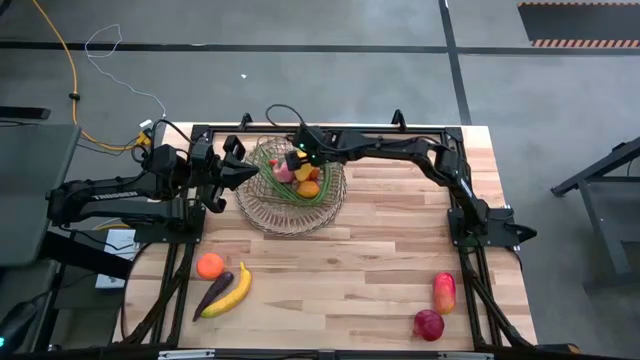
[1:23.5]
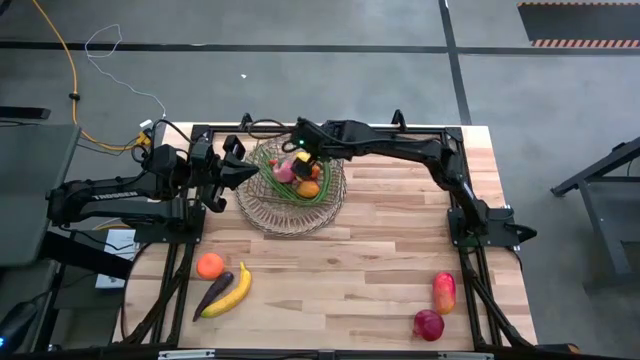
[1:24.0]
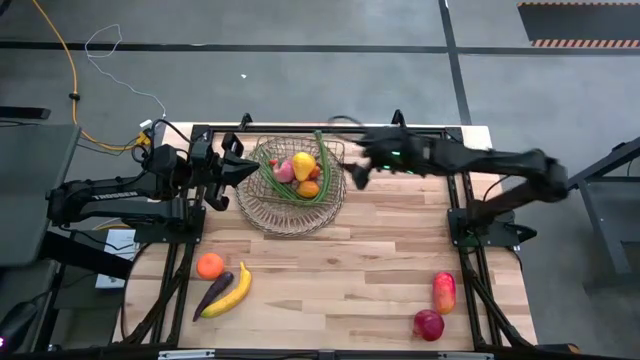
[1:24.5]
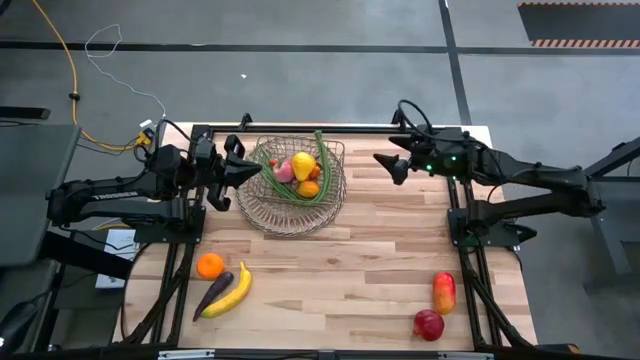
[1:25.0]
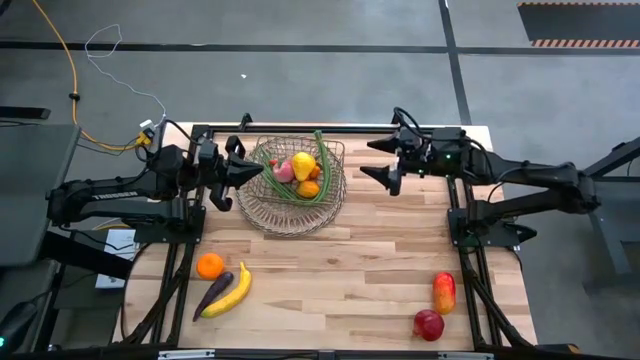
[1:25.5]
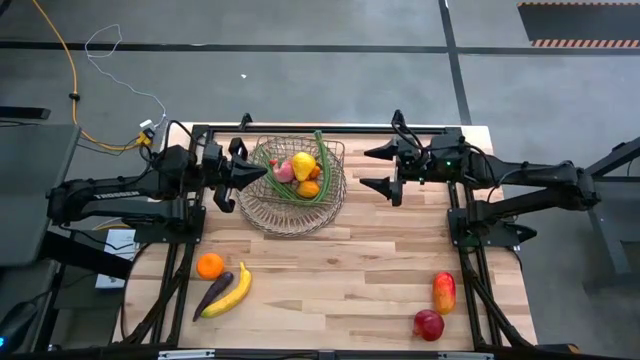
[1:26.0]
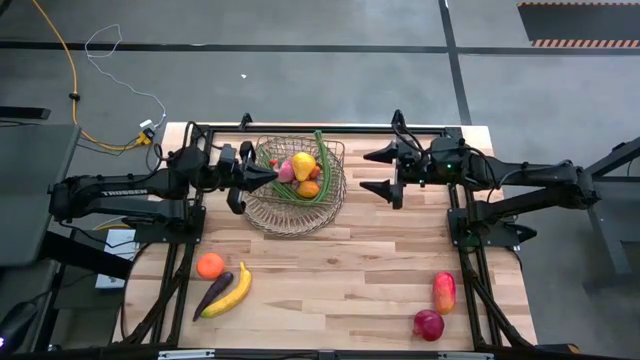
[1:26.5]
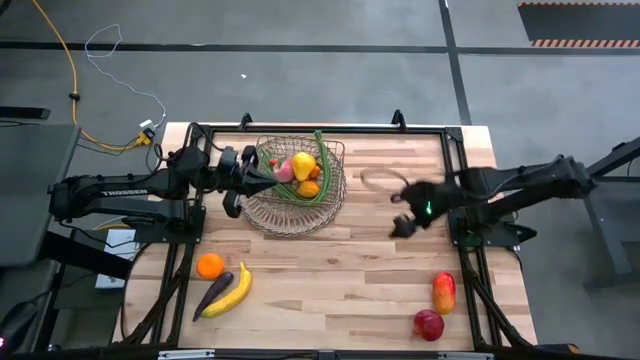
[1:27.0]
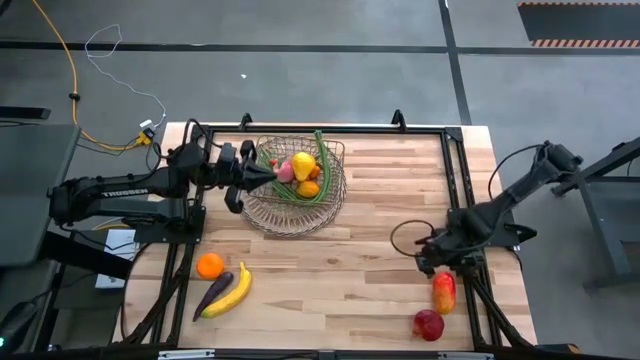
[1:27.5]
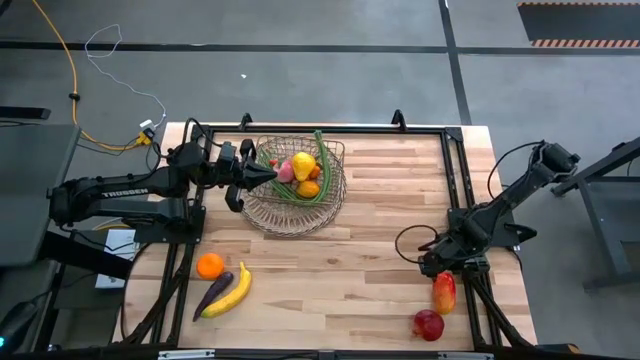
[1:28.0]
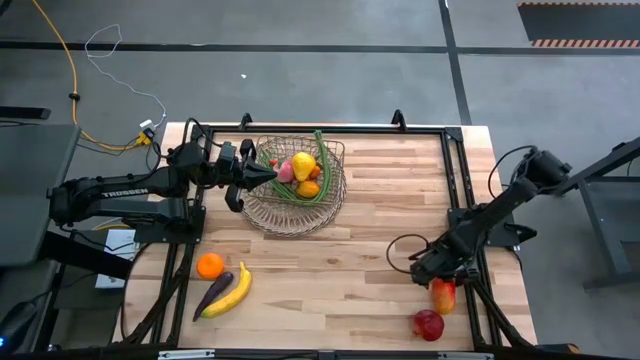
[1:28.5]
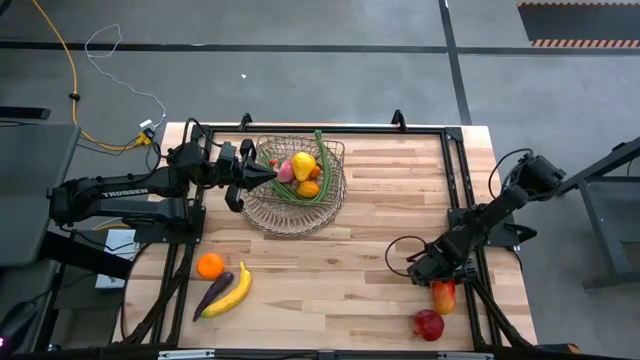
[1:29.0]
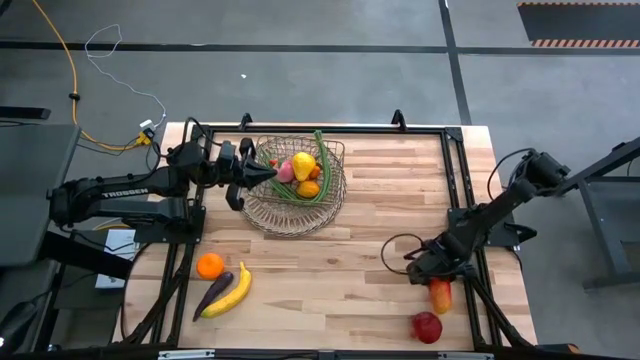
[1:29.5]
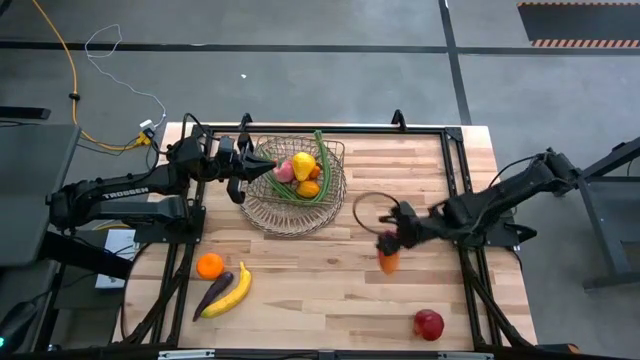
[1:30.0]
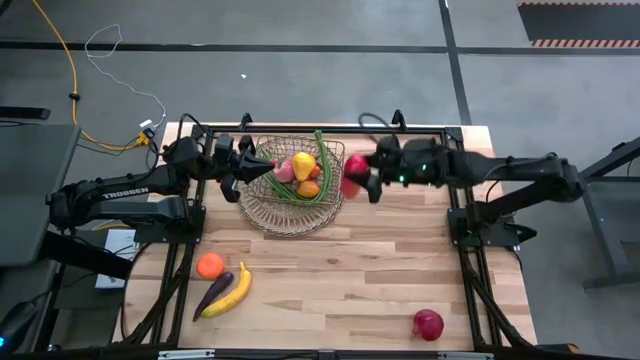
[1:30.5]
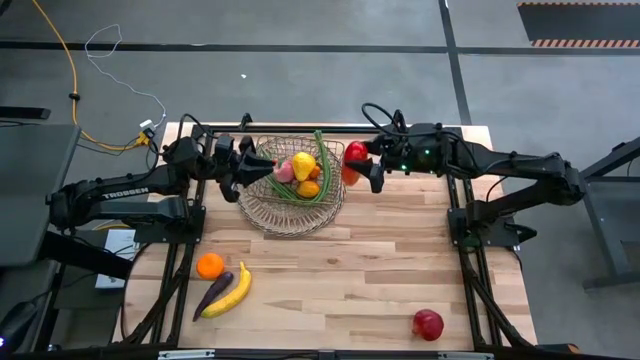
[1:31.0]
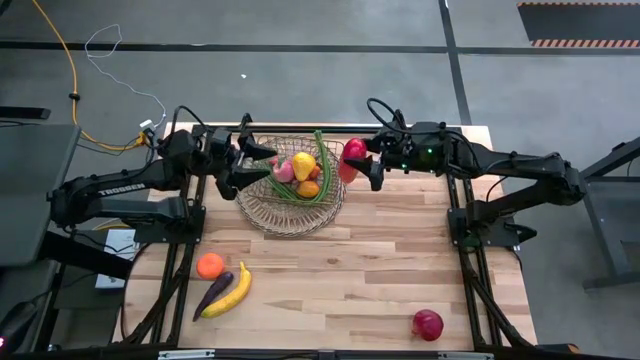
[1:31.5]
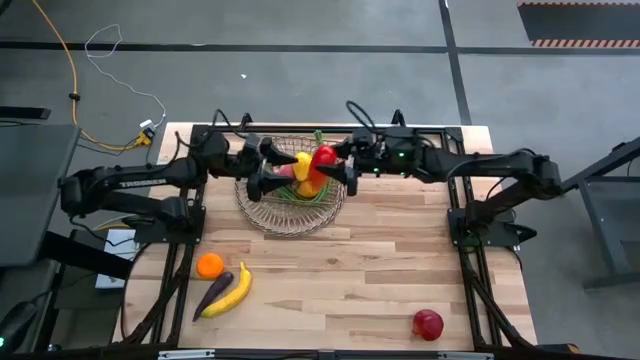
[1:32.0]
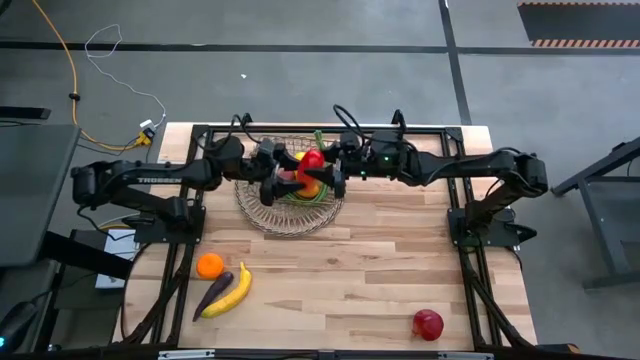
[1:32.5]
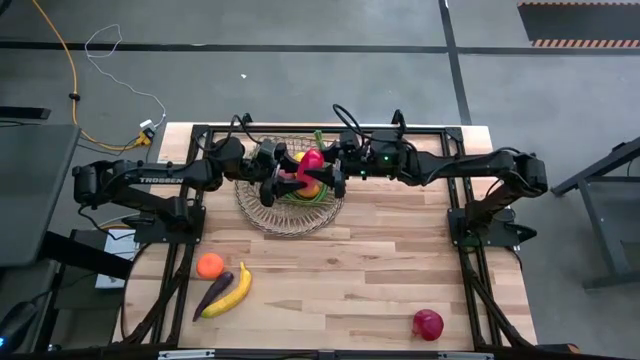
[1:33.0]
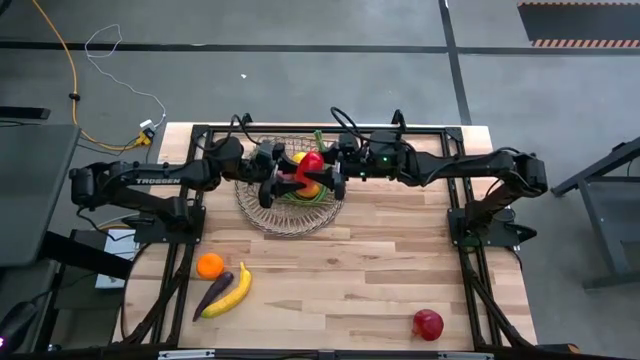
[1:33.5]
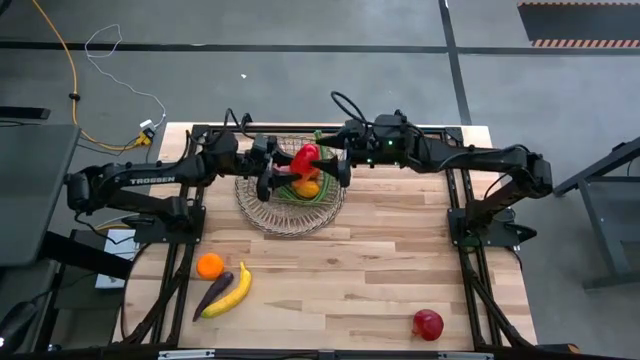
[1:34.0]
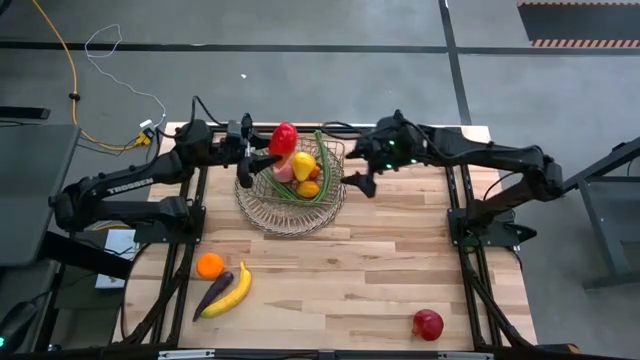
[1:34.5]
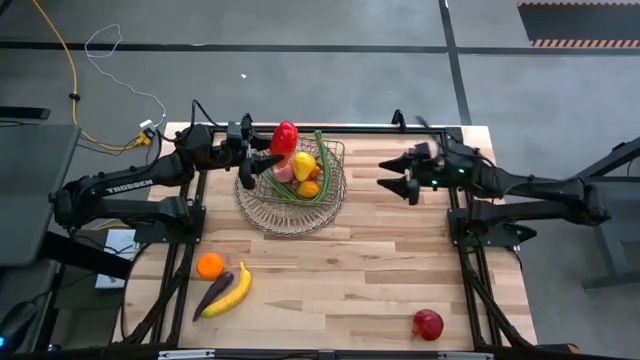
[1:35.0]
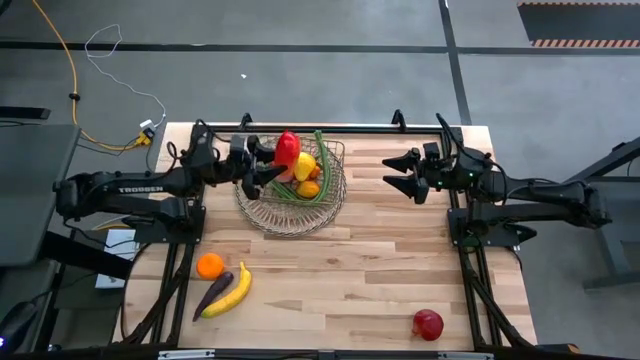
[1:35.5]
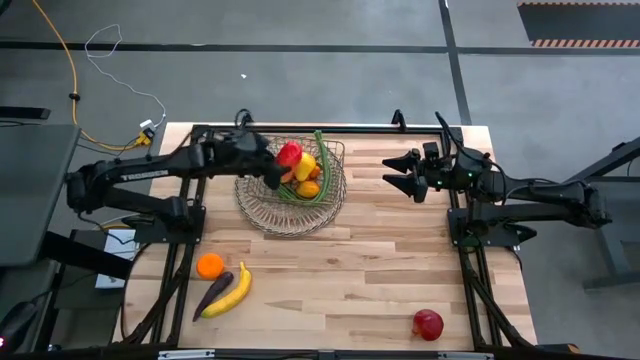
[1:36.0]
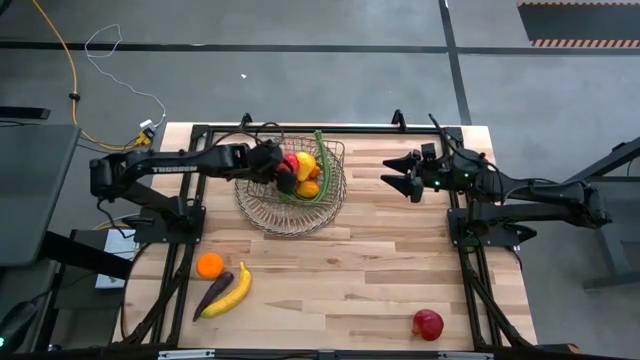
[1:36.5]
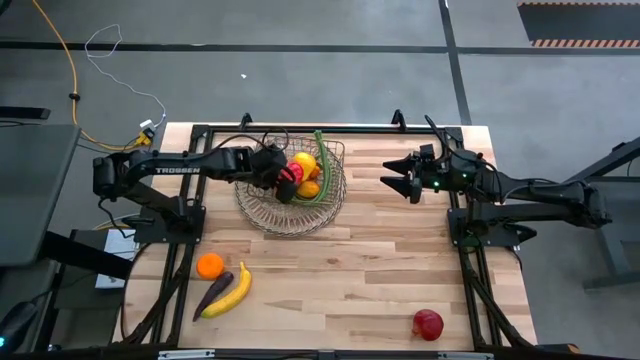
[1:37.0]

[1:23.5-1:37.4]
Task: Build produce basket
Put the red mango into the wire basket

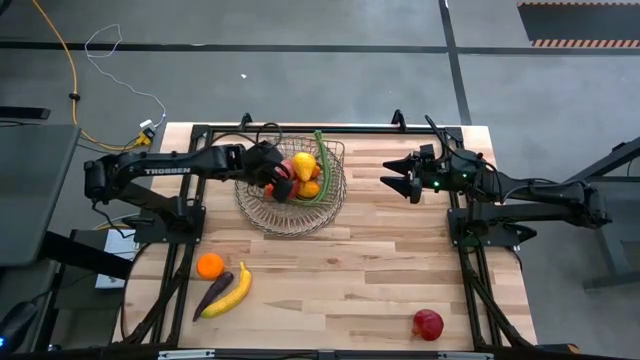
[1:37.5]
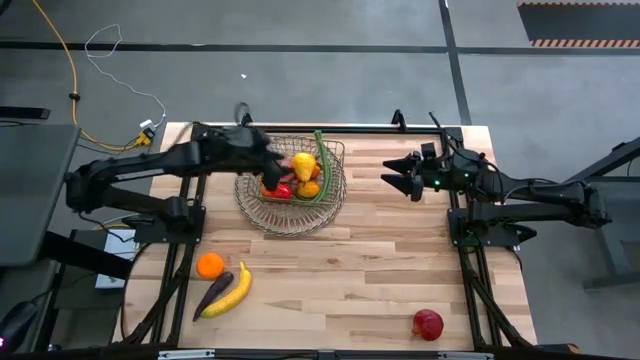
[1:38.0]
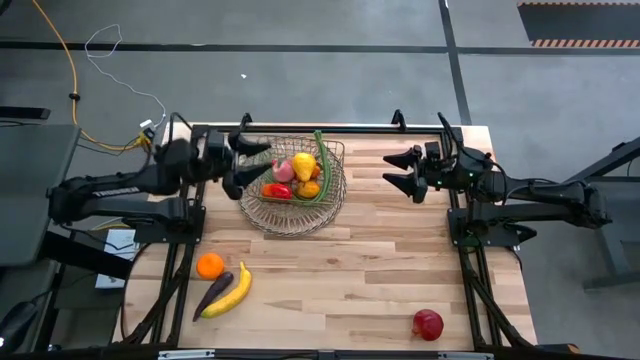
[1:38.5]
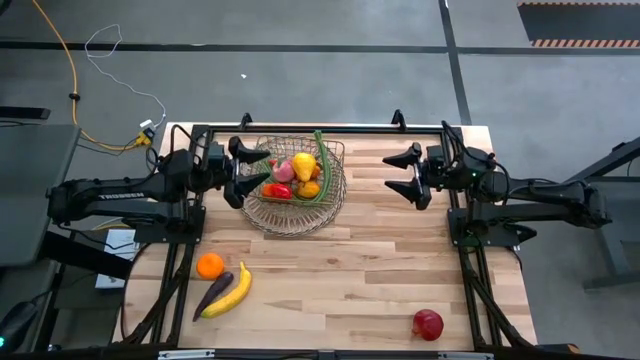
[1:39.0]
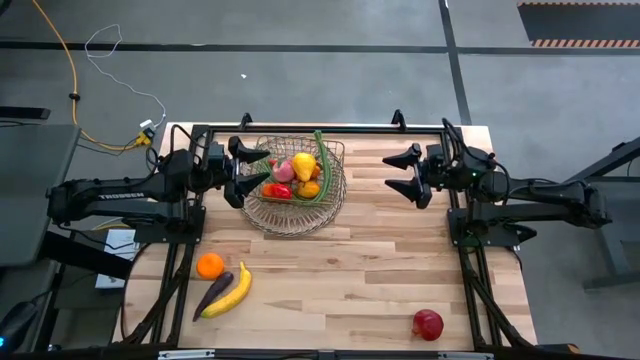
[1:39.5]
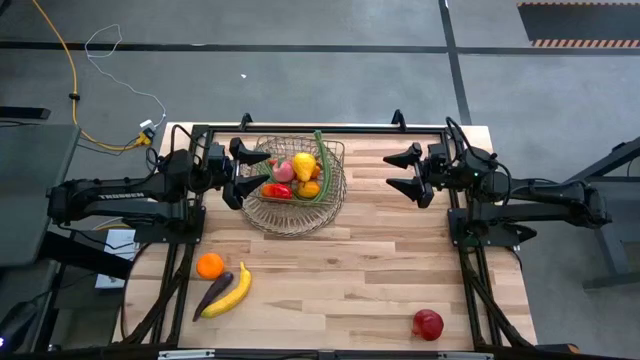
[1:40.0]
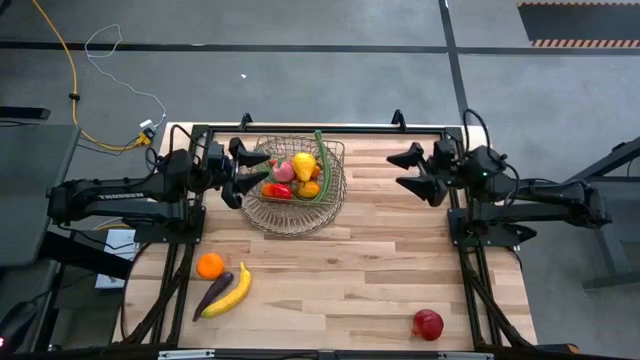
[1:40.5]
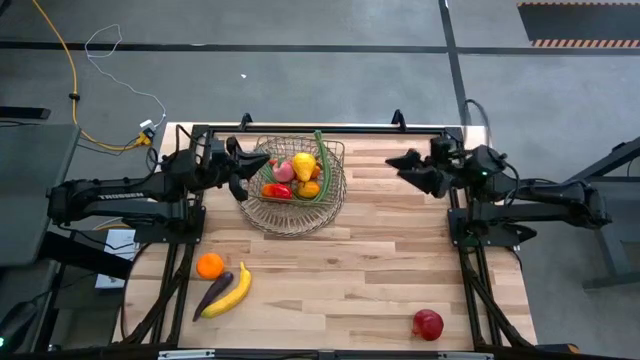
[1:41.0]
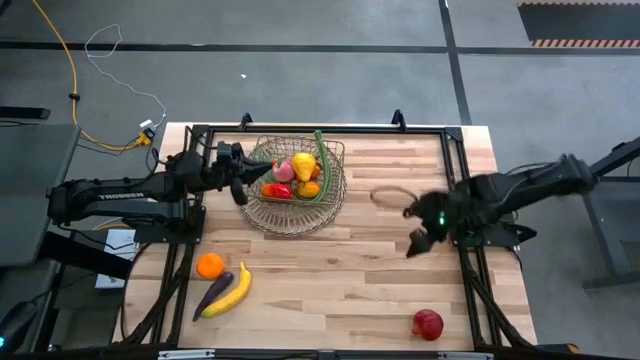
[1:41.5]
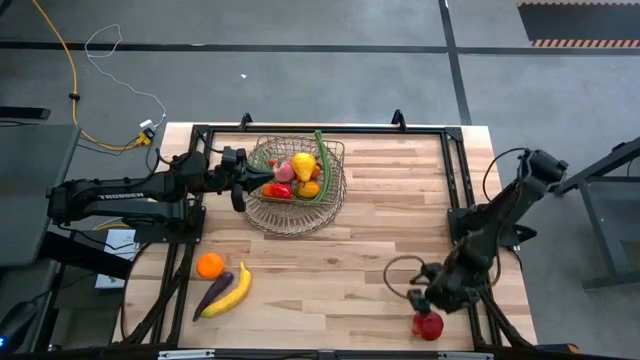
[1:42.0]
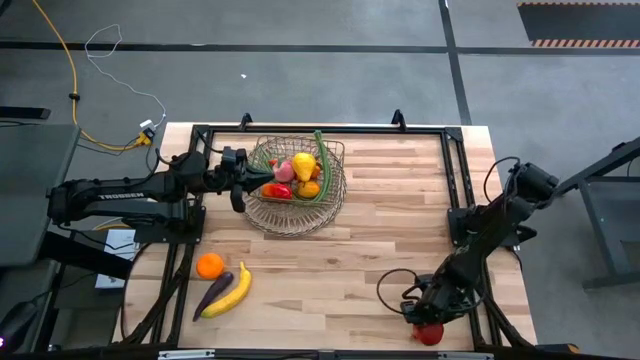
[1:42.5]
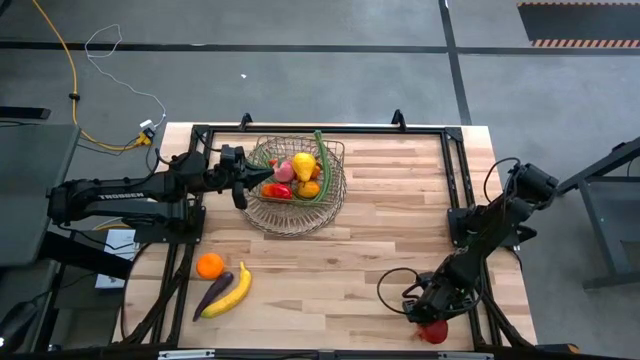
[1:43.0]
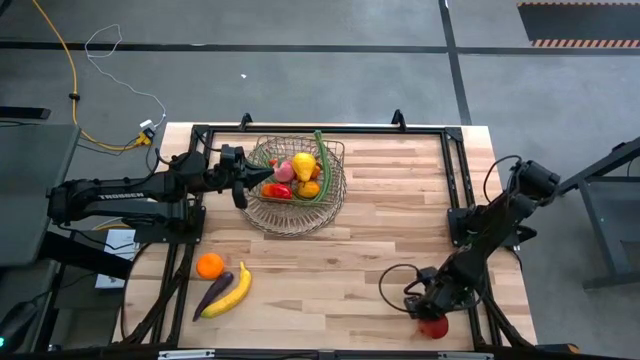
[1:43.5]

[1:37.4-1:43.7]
Put the pomegranate into the wire basket

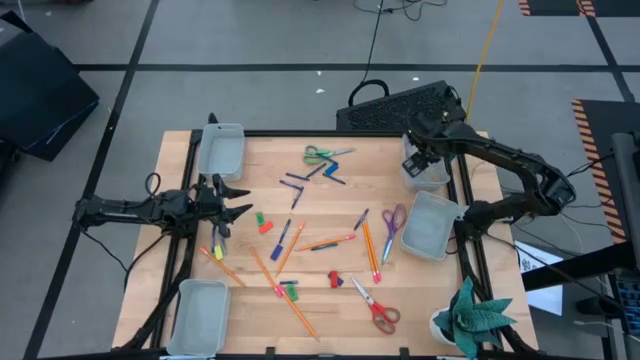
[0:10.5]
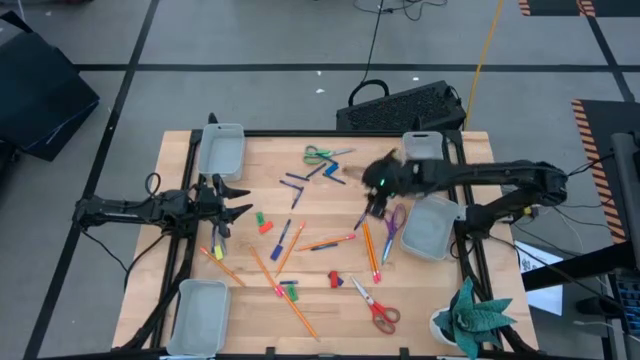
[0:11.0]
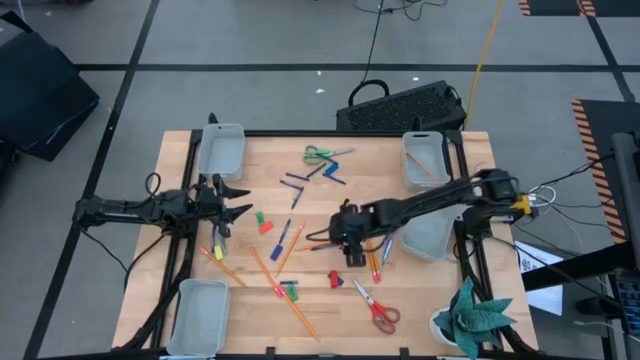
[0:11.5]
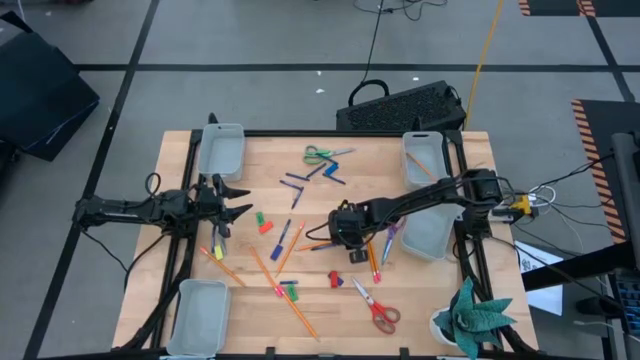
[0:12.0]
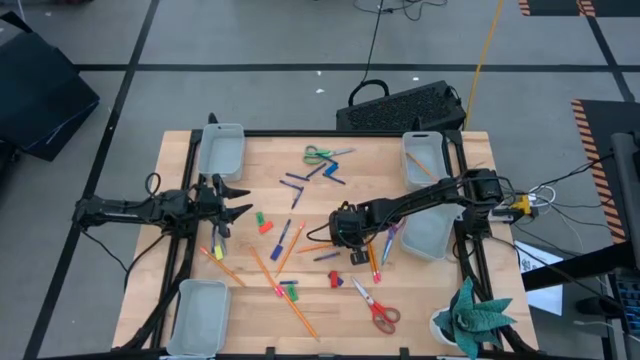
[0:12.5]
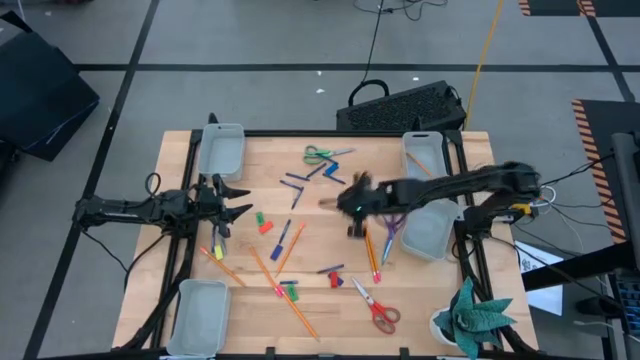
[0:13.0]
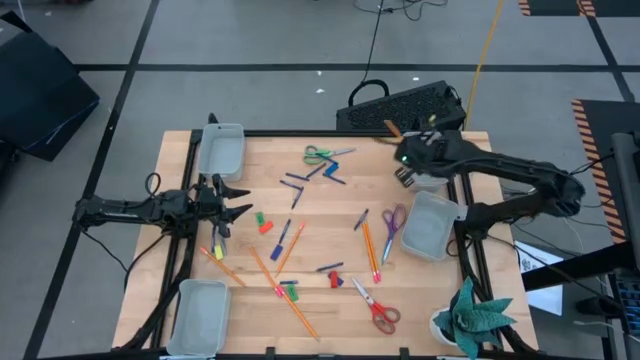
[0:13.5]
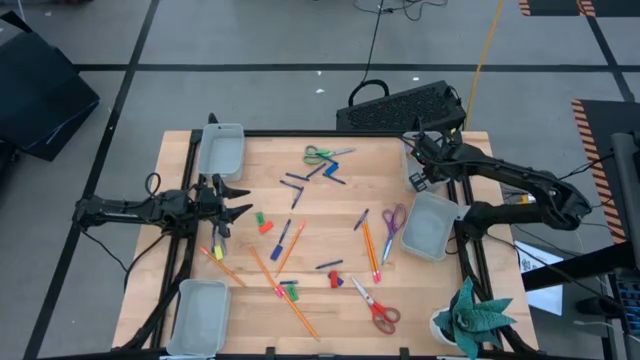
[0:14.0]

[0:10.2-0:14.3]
Task: Sort crayons/erasers/pens/pencils in bins
Put the orange pencil into the top right gray bin
